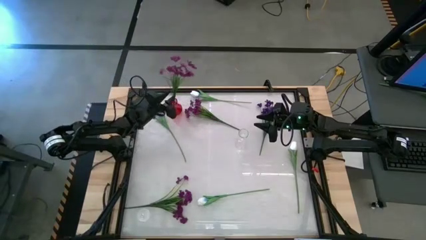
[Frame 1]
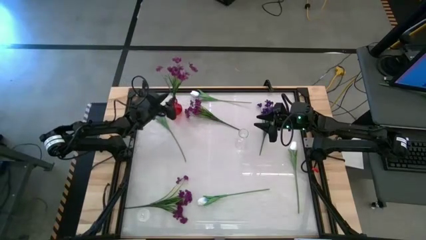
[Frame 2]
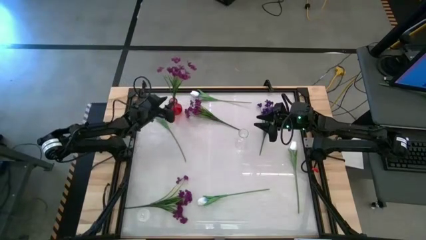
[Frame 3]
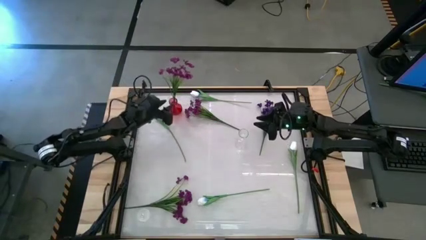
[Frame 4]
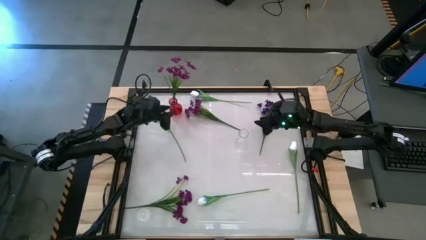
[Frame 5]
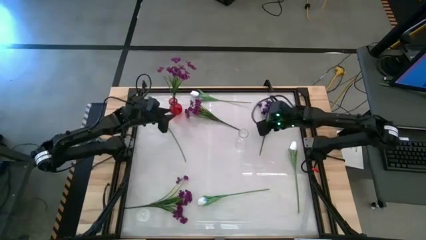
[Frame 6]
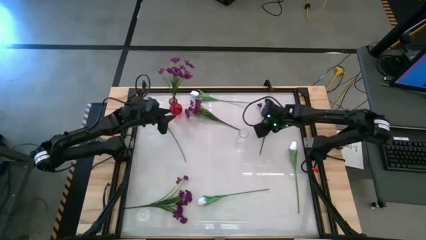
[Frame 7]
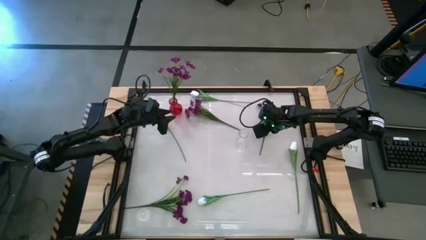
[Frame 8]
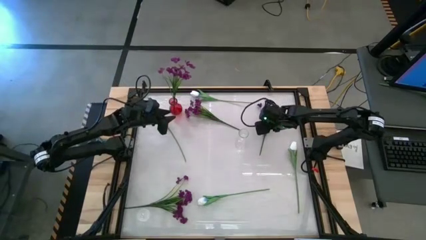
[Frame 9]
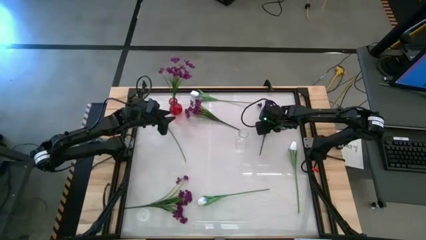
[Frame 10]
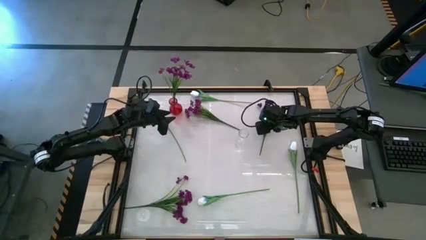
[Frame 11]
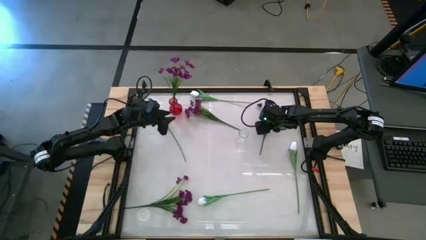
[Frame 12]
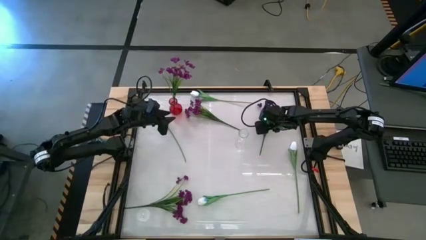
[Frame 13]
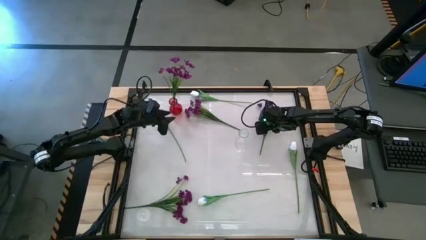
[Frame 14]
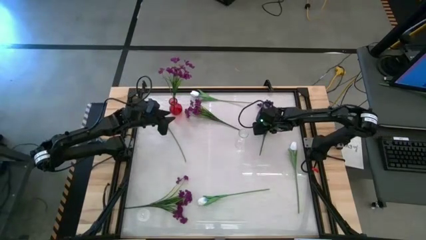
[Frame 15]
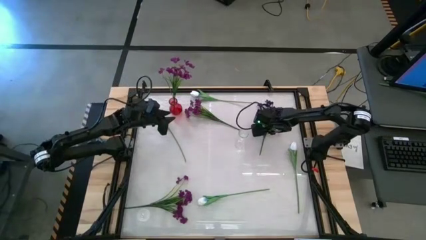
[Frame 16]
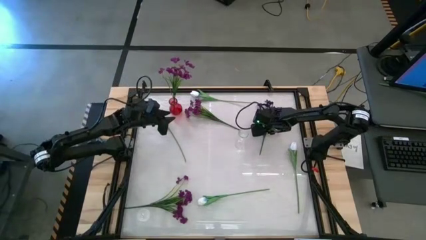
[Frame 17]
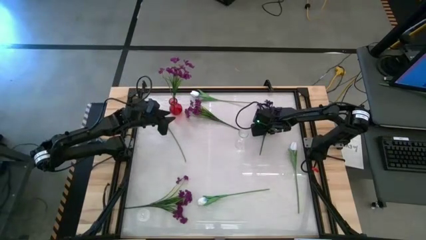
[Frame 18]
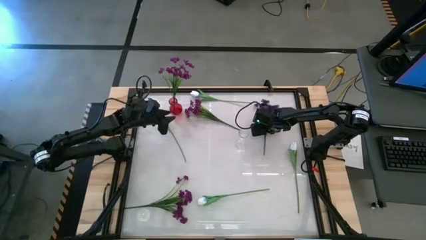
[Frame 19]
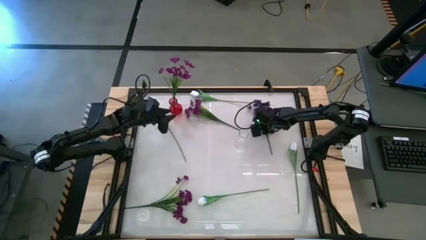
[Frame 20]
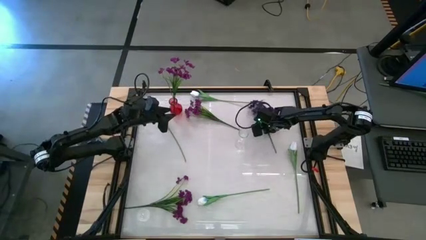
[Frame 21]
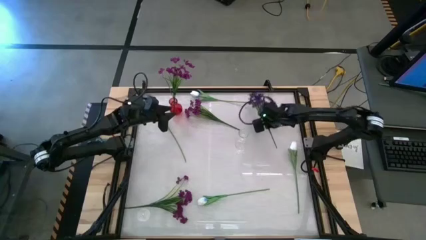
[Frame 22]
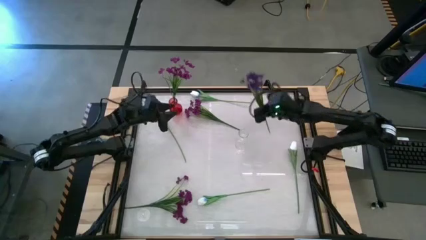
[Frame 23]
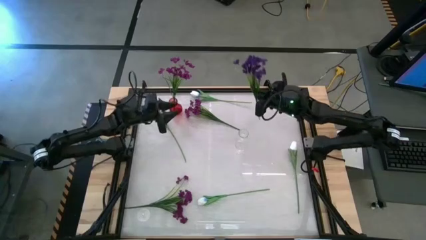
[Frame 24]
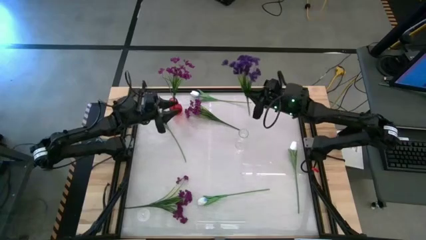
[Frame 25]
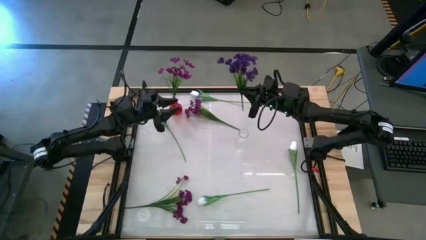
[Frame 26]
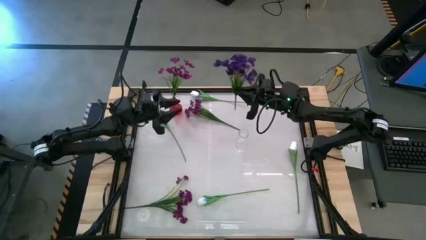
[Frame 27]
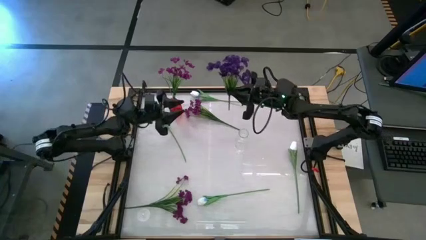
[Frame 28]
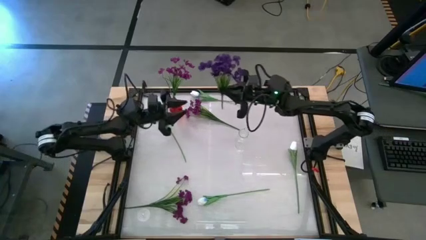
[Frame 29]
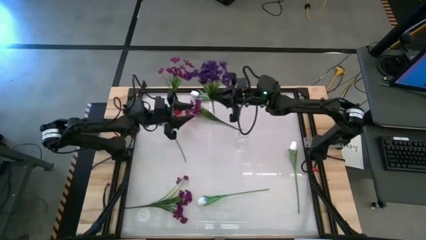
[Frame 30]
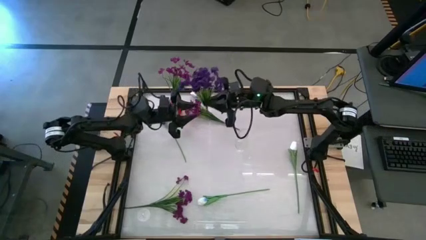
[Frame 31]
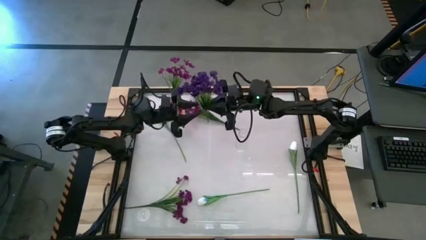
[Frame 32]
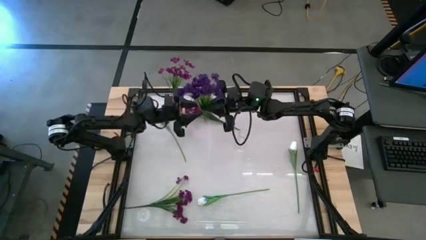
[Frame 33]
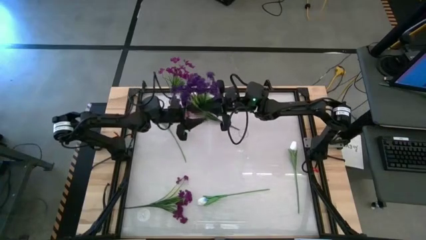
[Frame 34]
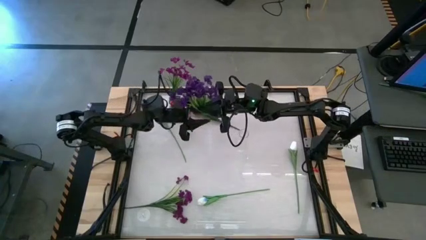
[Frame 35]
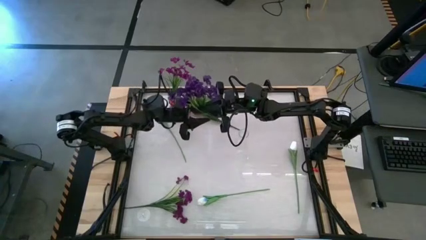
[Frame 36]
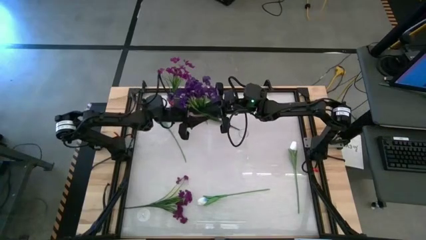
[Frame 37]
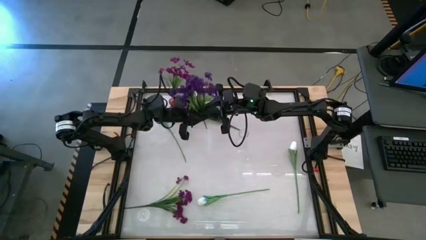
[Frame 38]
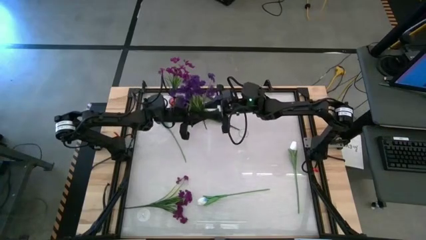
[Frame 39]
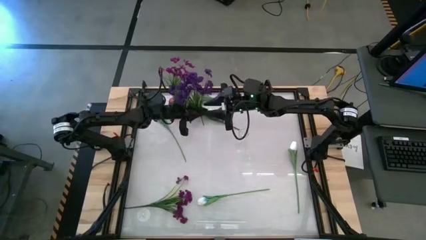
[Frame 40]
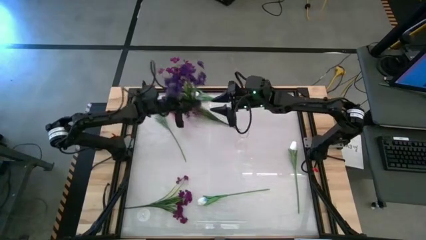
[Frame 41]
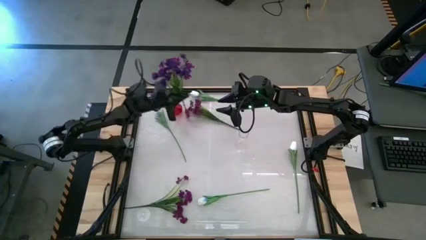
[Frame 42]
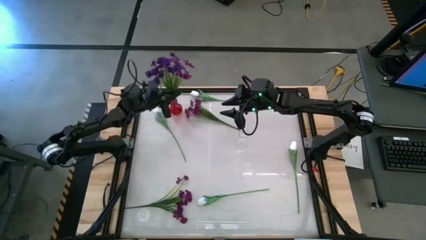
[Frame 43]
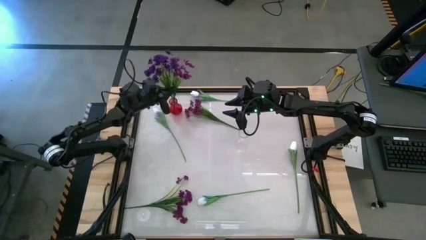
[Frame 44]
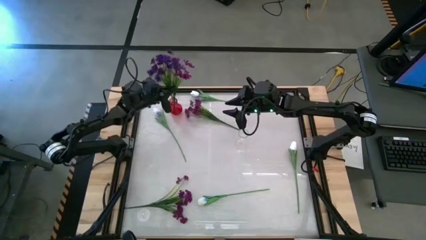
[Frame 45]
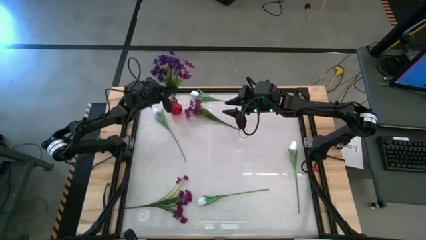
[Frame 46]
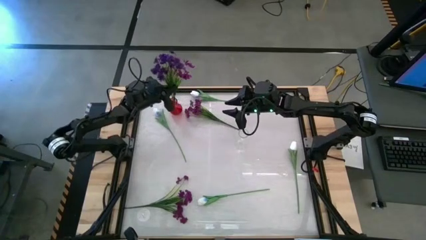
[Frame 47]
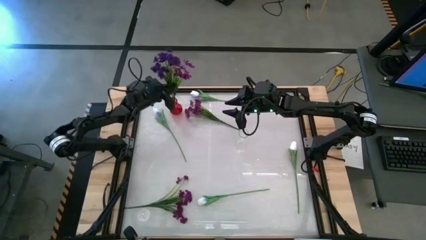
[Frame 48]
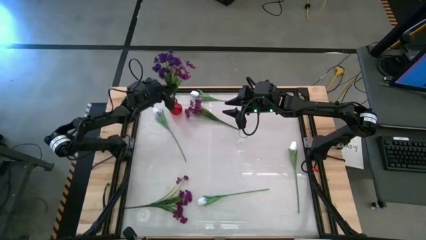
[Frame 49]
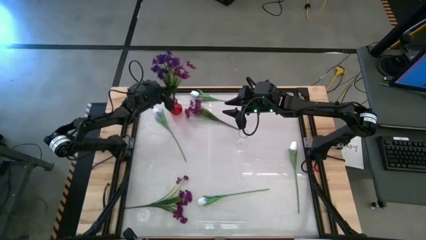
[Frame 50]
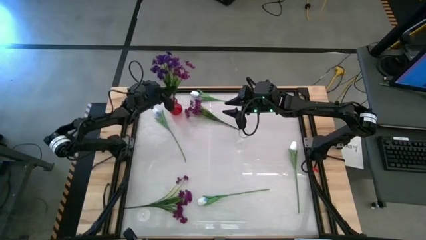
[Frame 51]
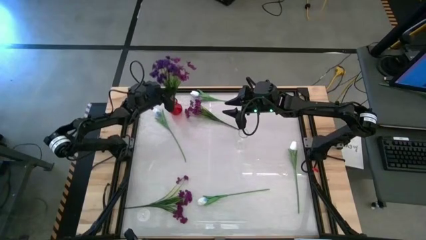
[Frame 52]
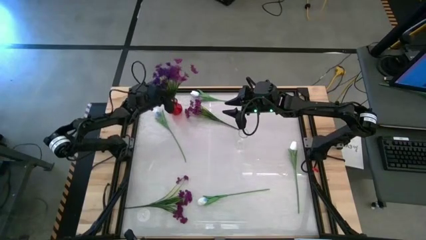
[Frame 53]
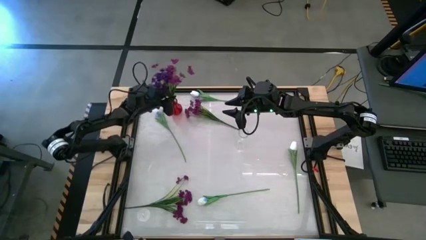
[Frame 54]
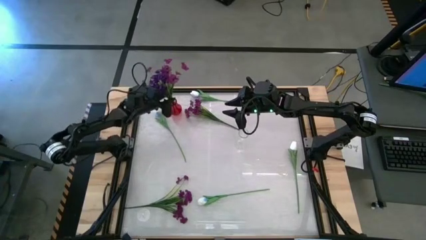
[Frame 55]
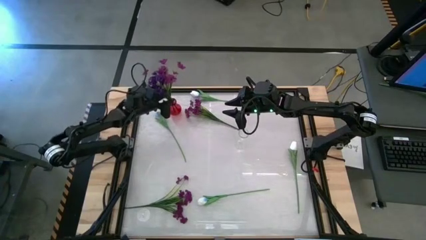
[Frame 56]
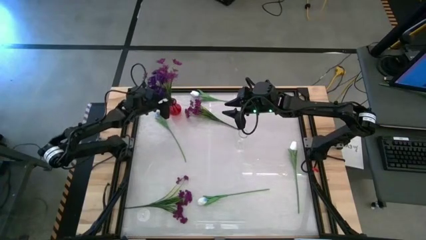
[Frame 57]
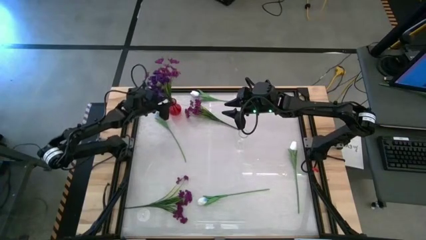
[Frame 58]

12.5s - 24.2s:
Task: Sort flowers into vase by color
Put the purple flowers into the red vase

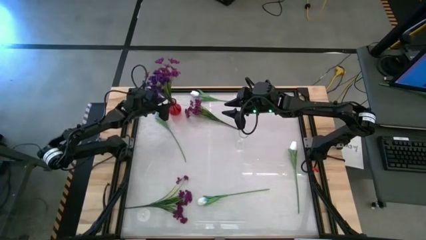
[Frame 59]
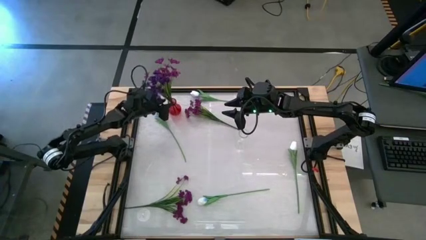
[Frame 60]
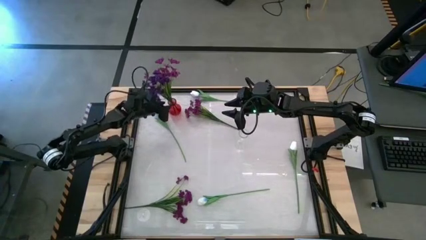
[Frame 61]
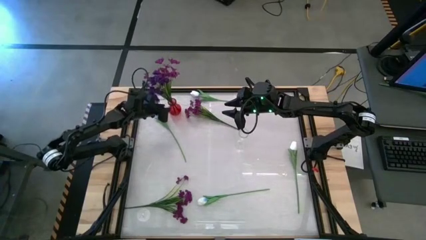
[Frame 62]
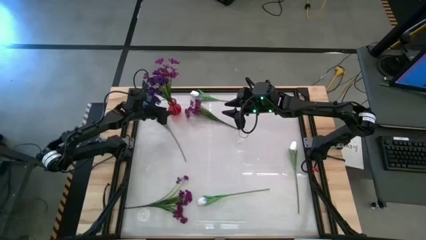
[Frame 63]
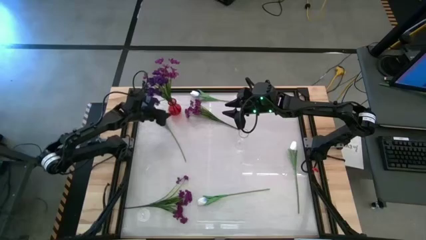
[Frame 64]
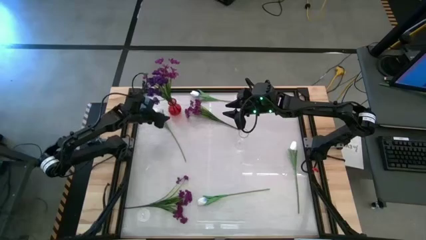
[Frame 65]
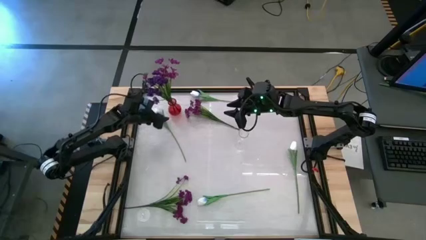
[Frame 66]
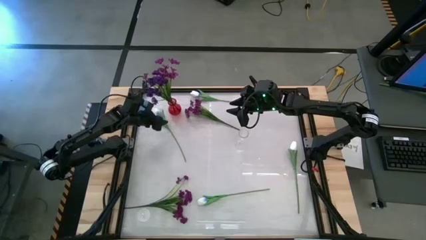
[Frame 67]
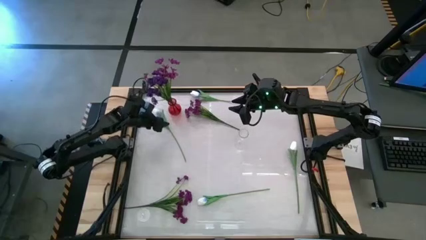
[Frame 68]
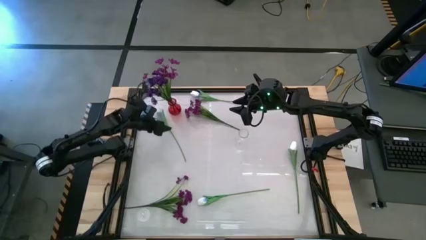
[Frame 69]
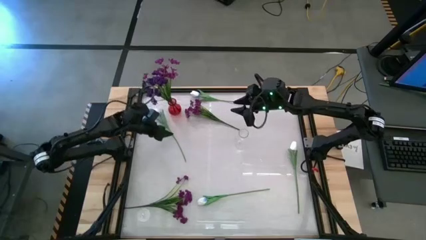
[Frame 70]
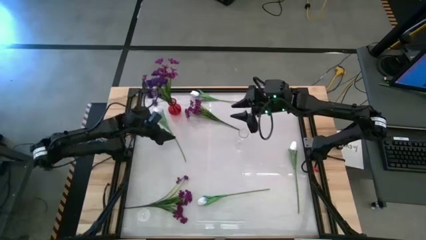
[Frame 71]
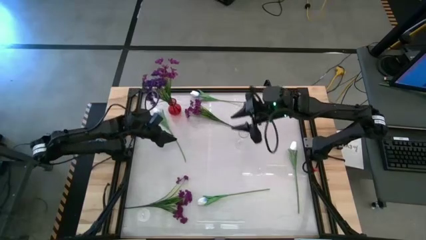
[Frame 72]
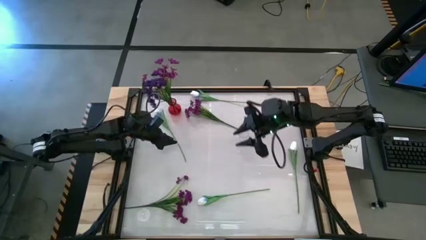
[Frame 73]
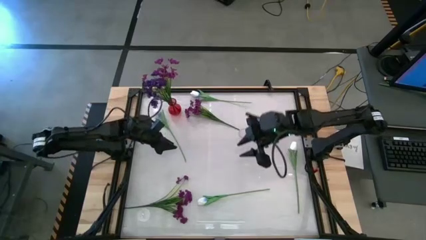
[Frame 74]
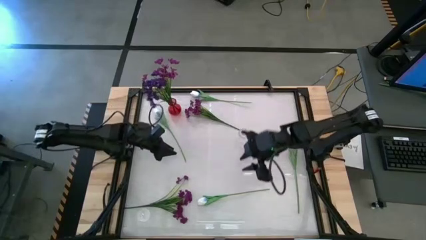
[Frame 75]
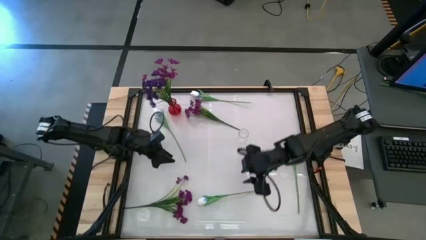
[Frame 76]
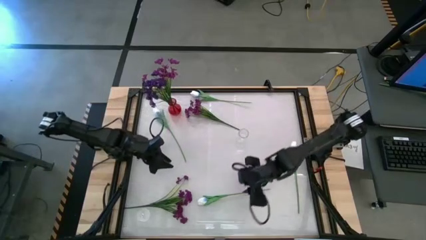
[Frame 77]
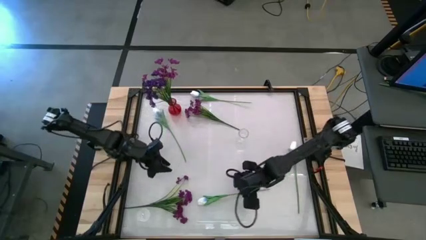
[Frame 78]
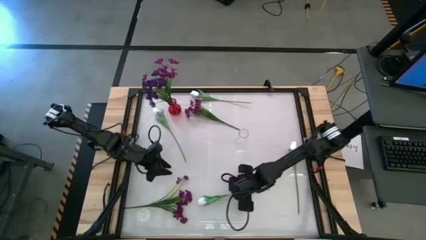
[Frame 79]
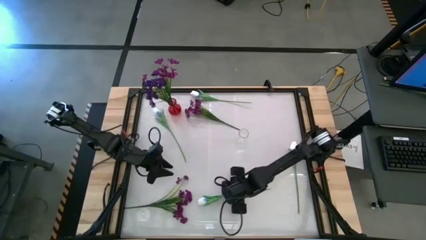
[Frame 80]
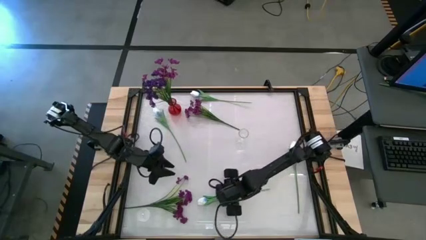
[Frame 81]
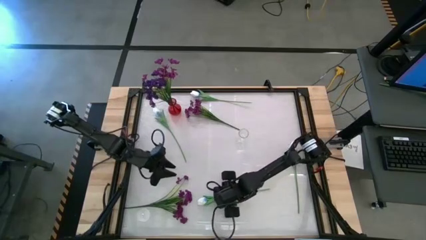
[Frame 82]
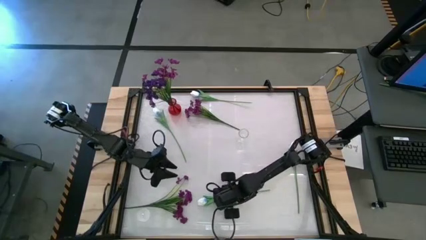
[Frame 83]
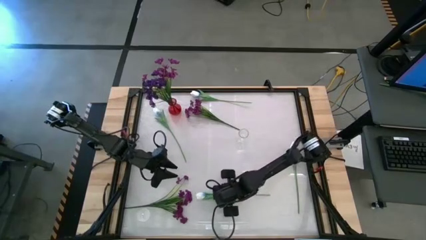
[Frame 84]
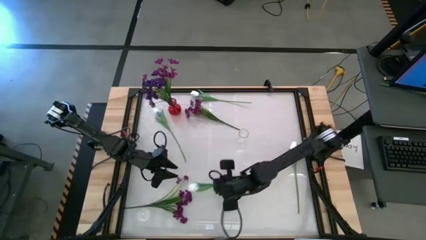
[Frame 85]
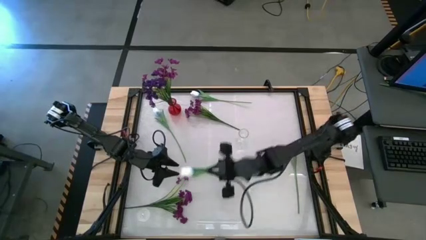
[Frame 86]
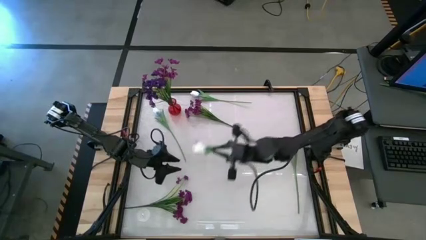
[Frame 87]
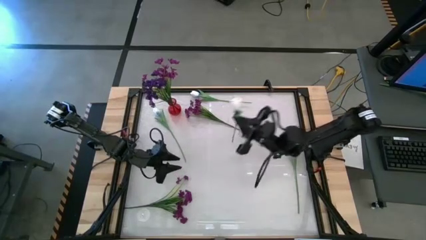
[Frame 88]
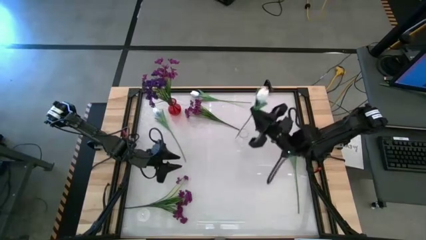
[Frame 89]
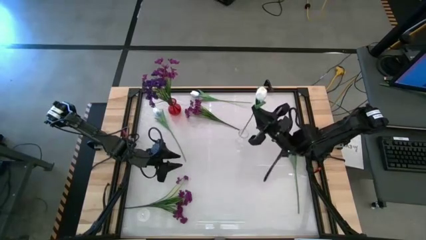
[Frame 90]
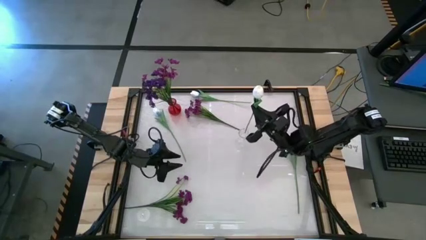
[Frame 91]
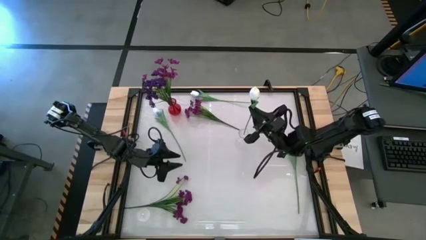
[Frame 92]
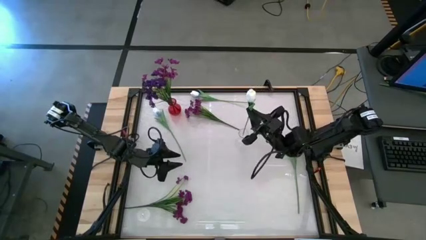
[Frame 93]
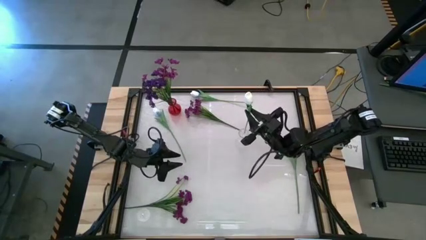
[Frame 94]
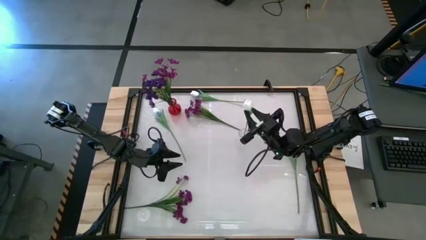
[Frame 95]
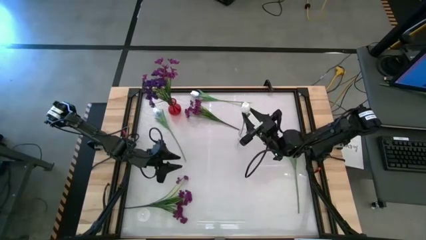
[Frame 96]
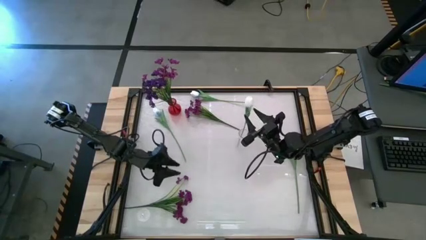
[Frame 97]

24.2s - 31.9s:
Put the white flower into the transparent vase
